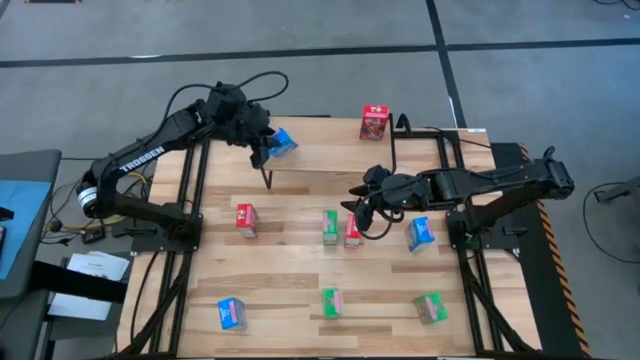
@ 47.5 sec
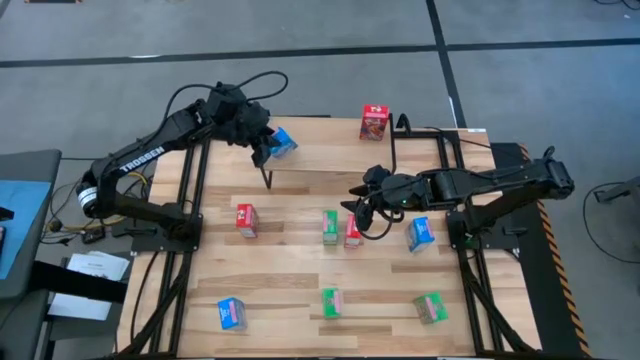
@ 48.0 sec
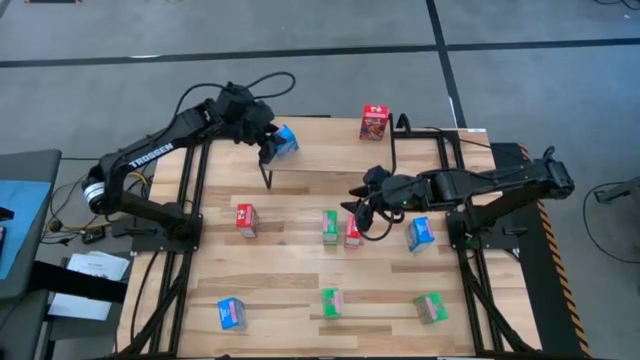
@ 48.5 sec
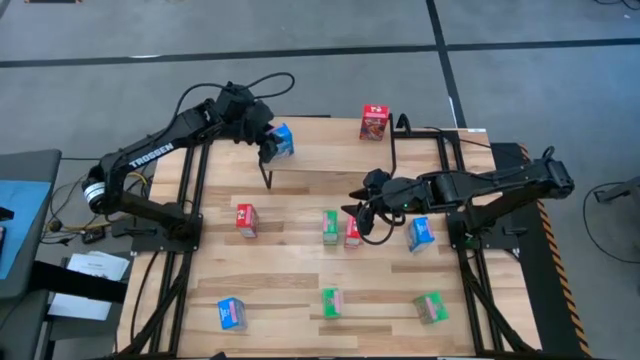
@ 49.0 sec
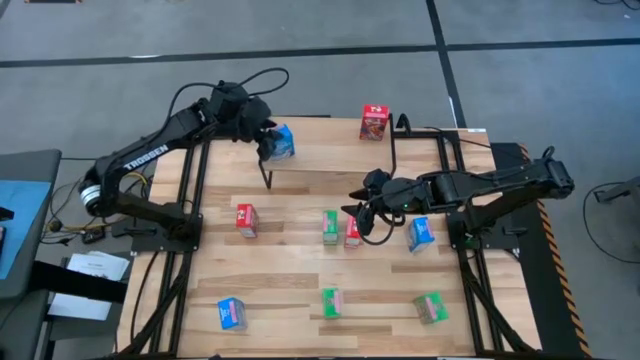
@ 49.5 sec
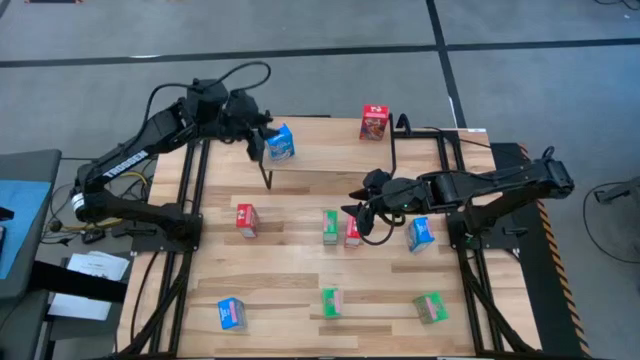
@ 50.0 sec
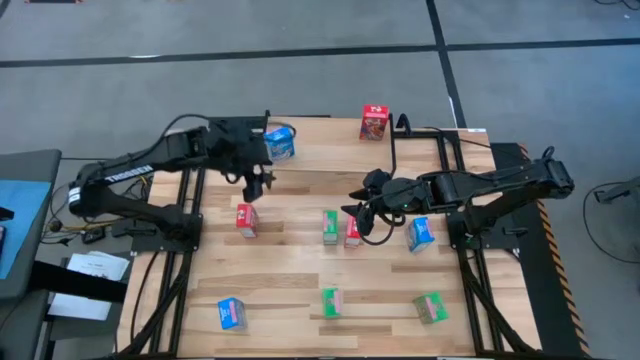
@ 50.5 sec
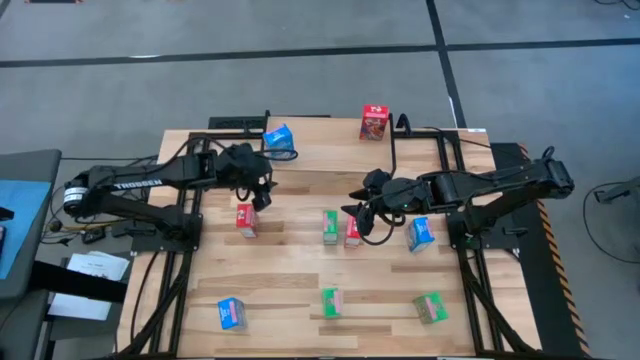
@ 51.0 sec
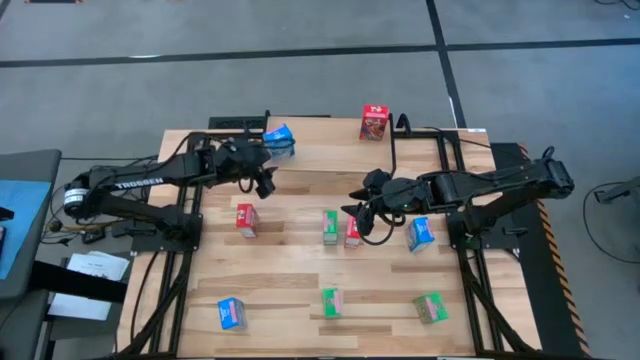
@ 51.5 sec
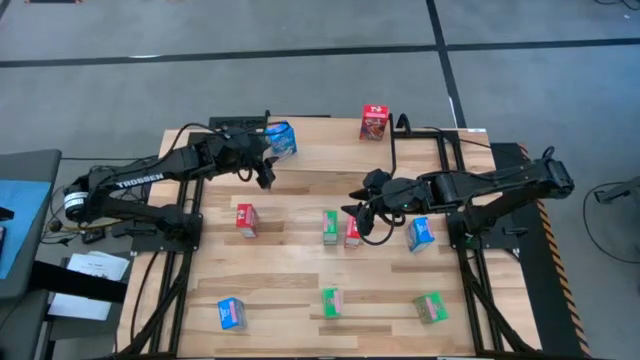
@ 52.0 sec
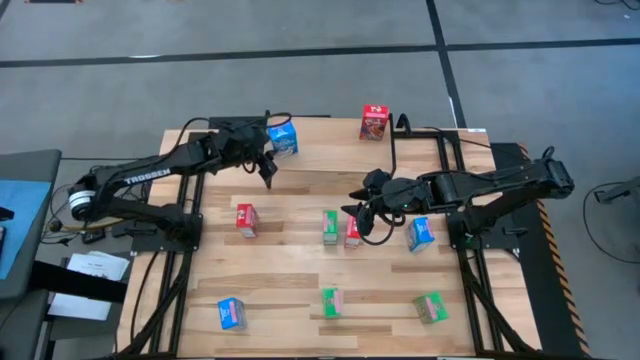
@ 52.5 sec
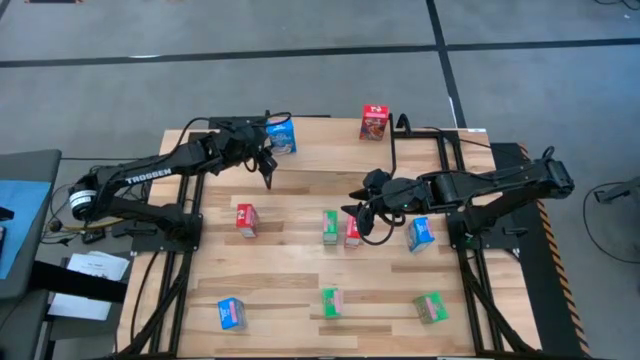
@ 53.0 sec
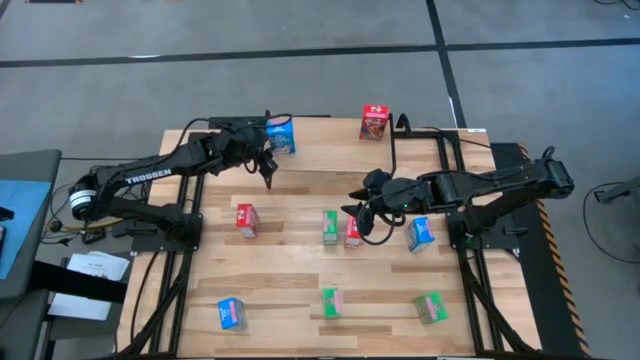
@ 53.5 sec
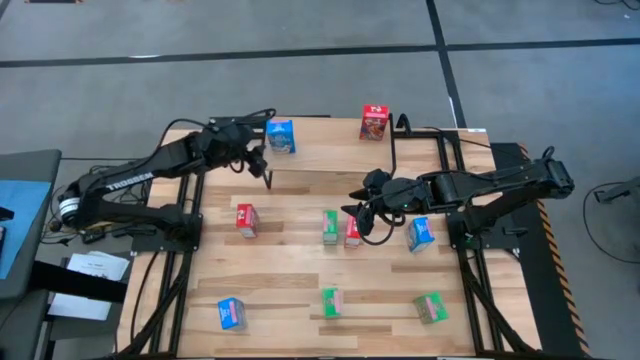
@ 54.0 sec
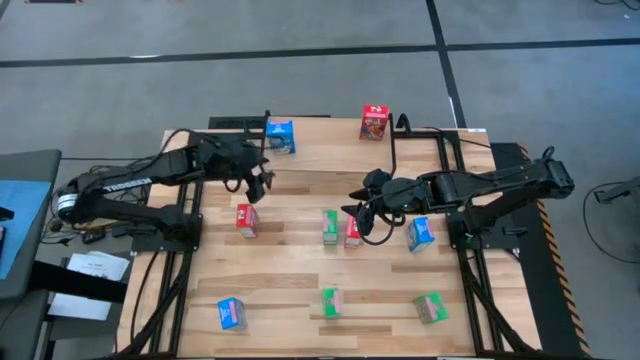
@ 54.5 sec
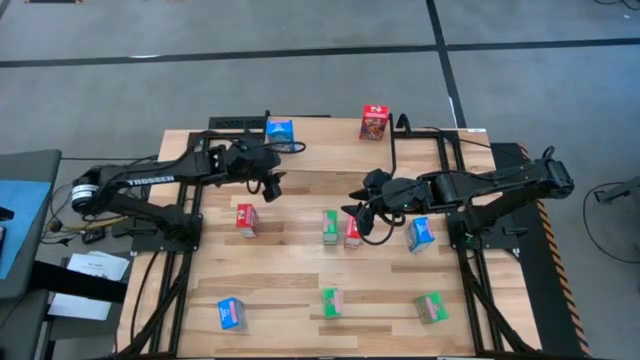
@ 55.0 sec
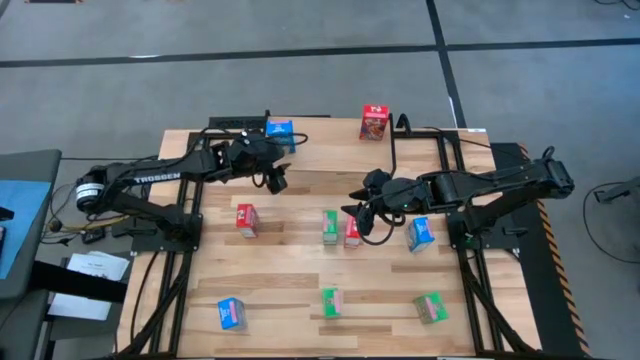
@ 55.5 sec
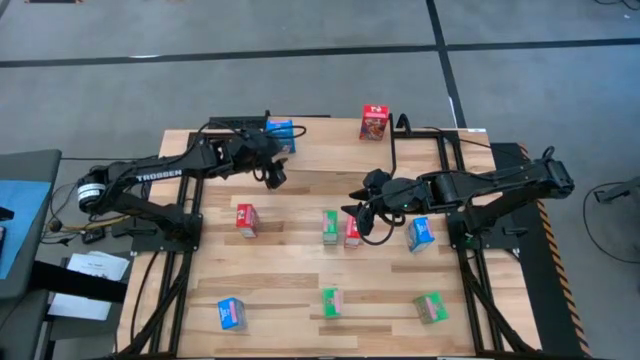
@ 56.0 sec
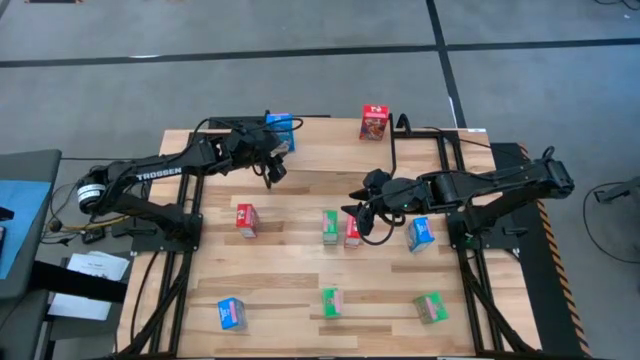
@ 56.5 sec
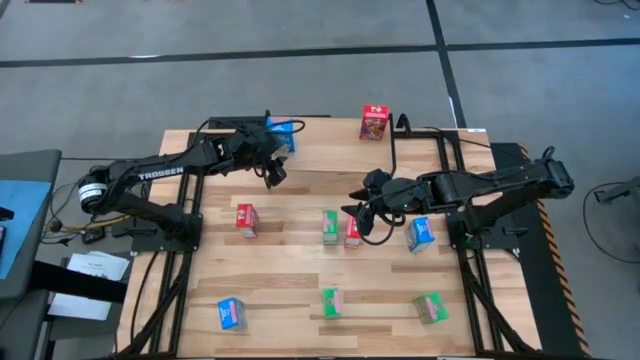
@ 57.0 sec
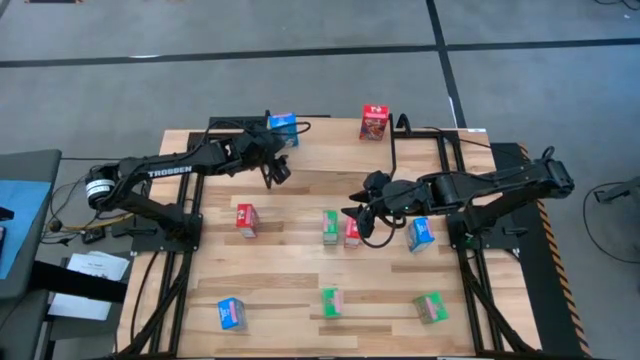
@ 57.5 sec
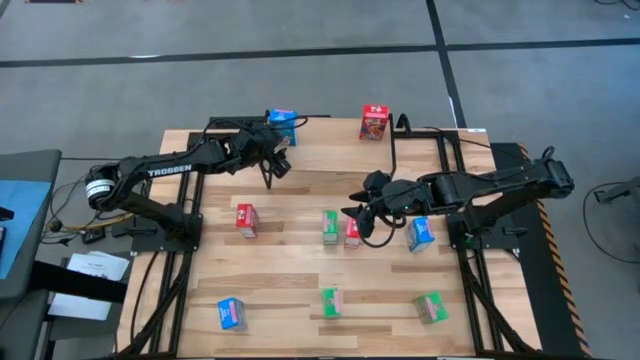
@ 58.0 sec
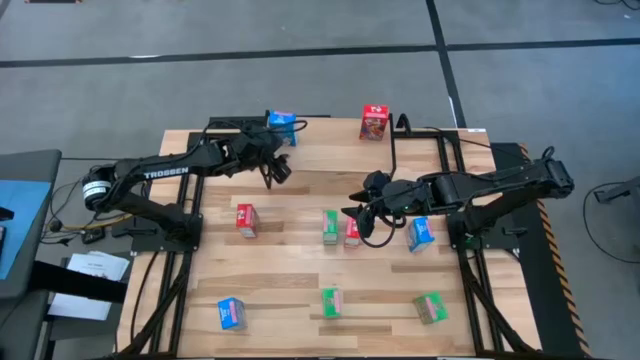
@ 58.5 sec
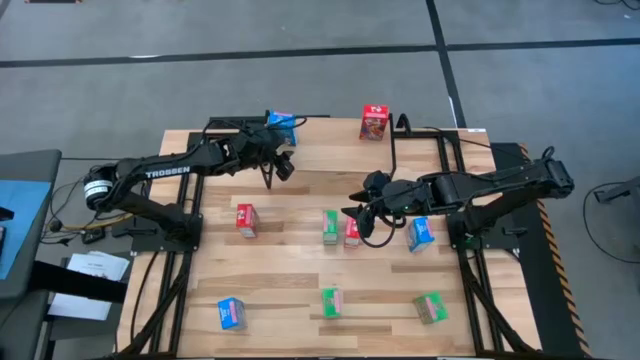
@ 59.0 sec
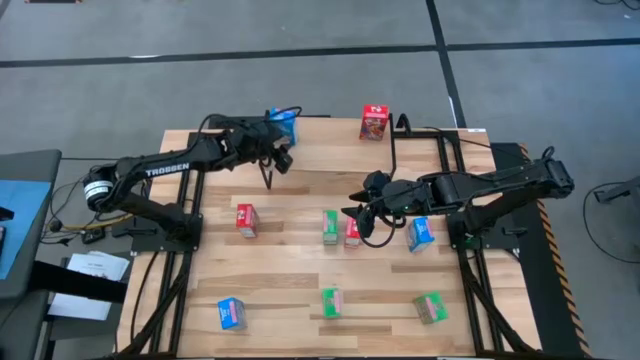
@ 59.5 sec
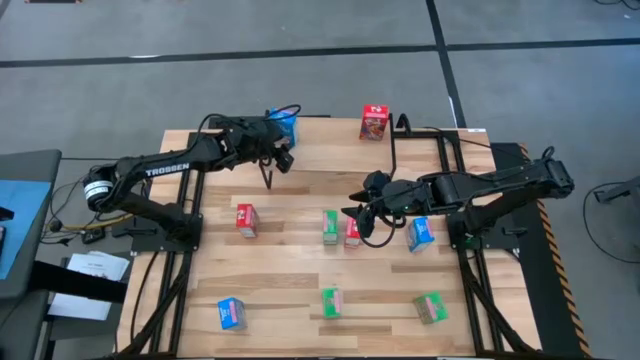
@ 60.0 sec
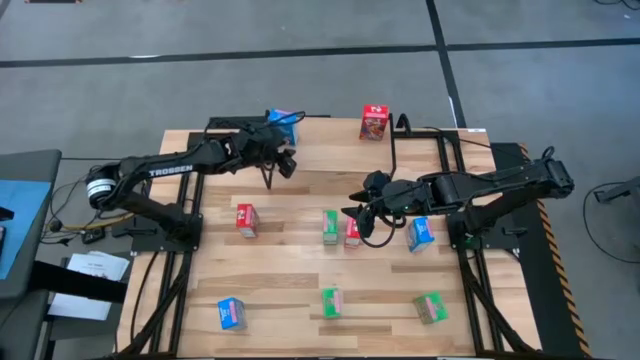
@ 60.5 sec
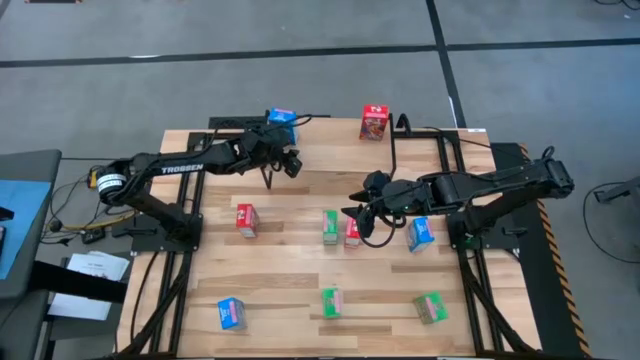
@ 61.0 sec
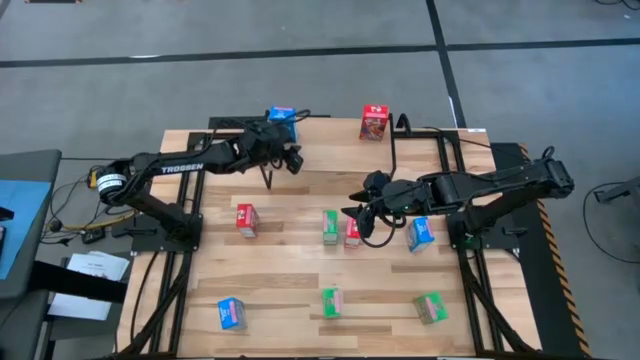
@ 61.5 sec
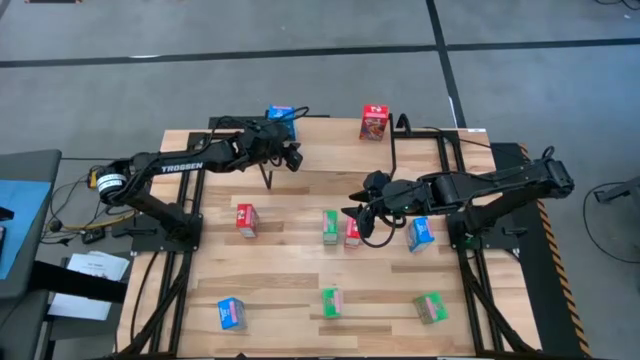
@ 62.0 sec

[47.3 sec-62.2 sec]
Task: Stack cereal on shelf
Put the top blue cereal box on the shelf

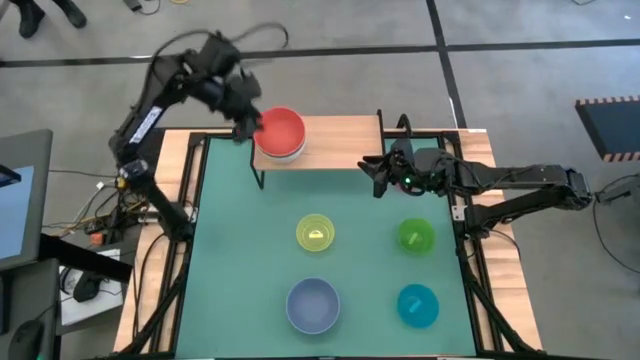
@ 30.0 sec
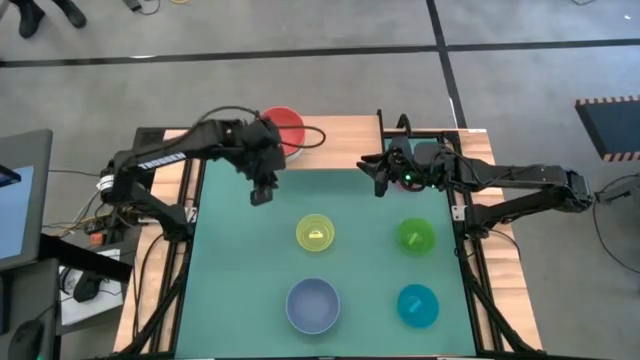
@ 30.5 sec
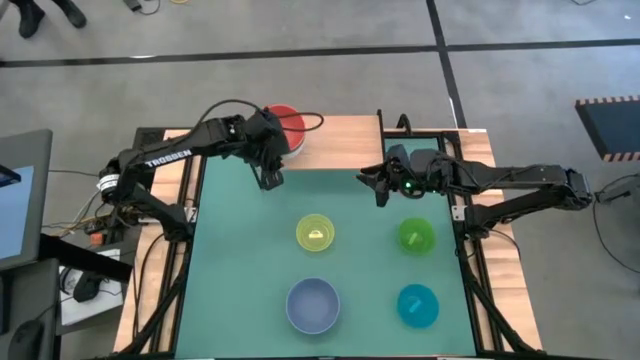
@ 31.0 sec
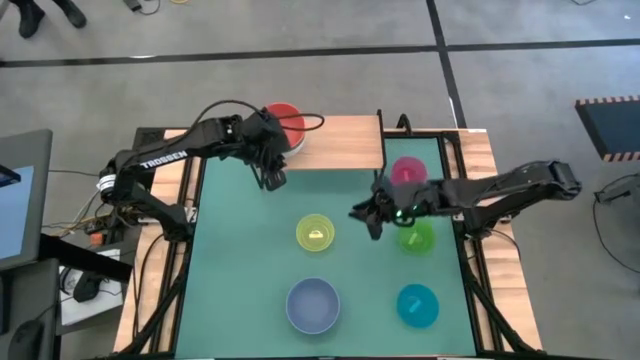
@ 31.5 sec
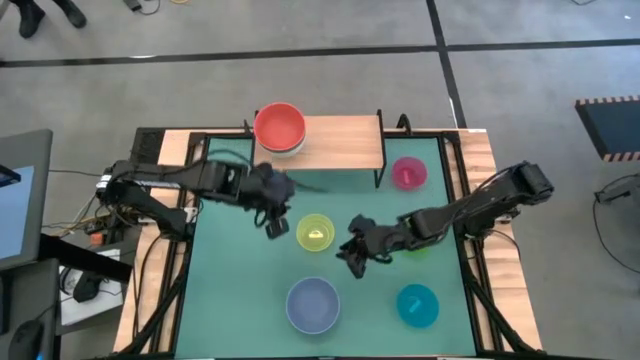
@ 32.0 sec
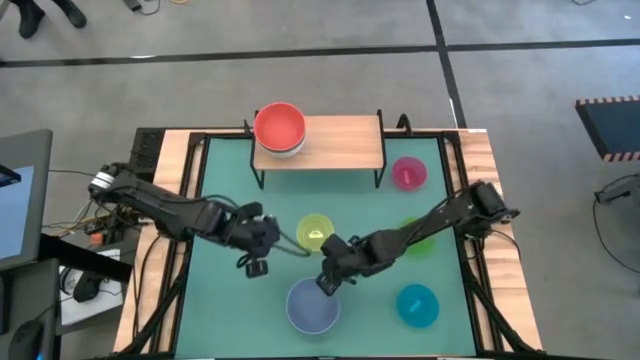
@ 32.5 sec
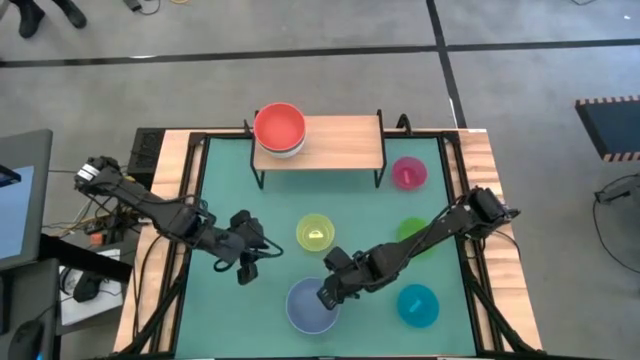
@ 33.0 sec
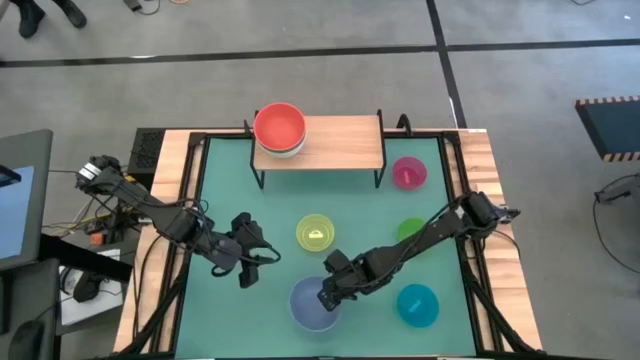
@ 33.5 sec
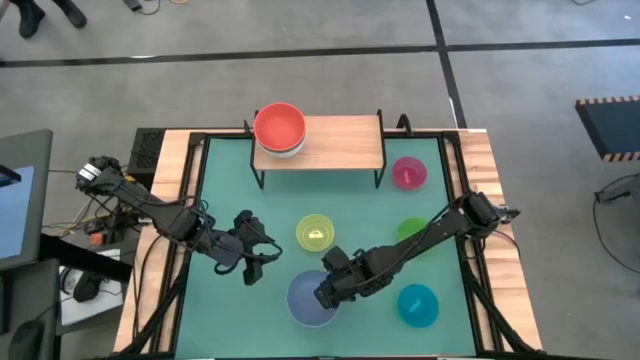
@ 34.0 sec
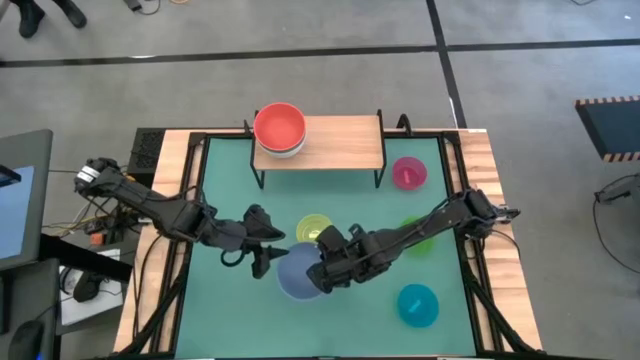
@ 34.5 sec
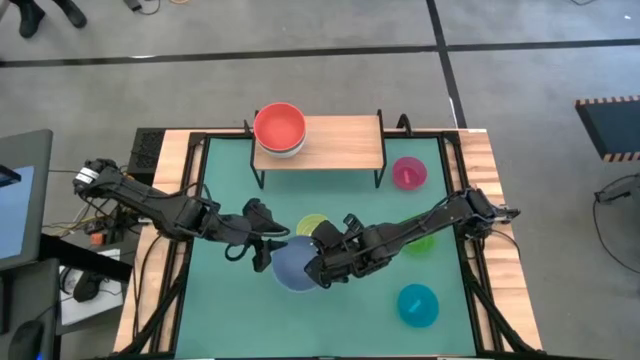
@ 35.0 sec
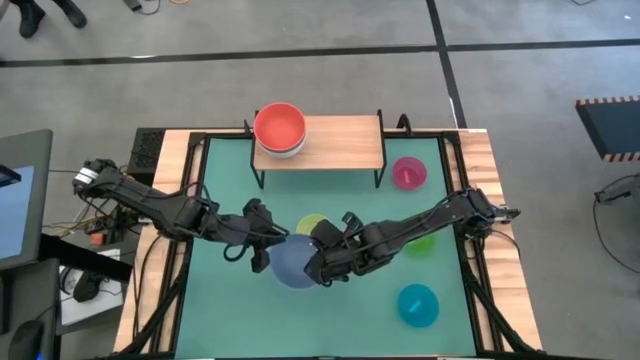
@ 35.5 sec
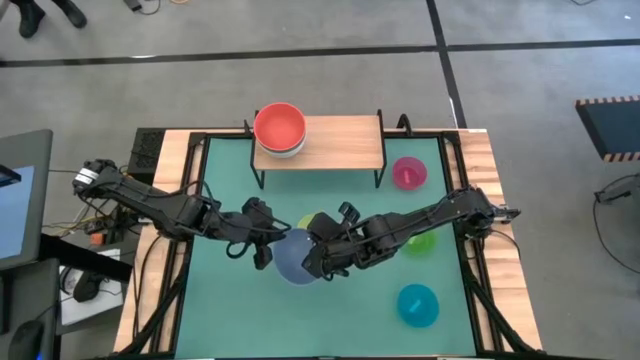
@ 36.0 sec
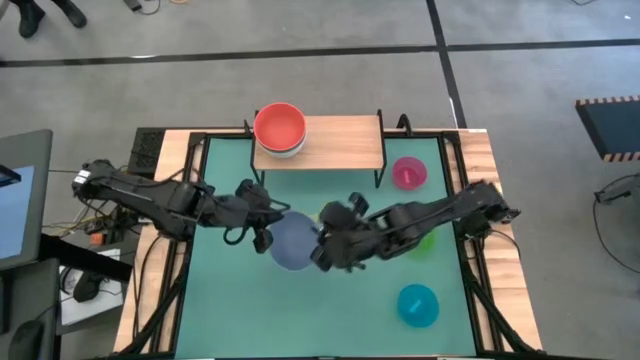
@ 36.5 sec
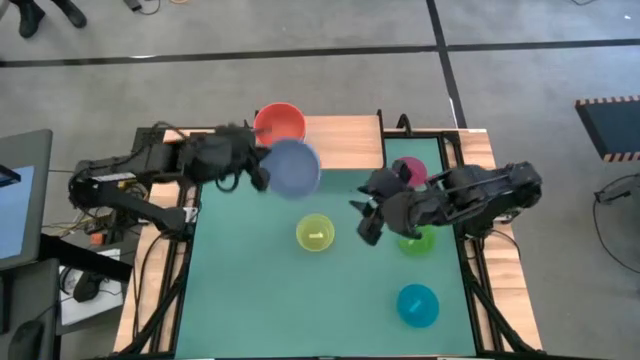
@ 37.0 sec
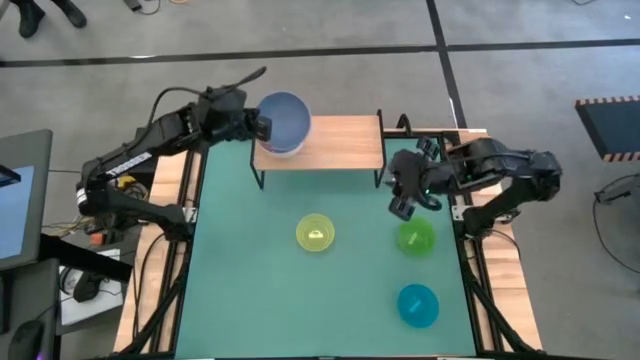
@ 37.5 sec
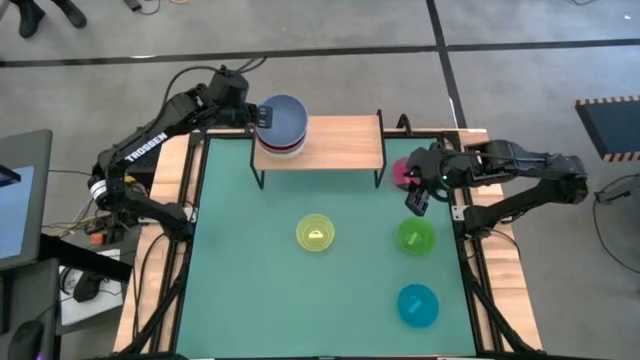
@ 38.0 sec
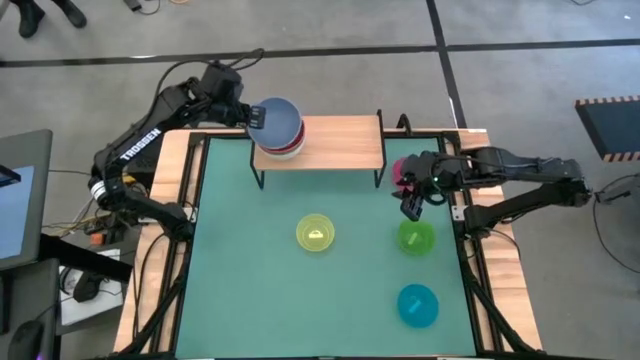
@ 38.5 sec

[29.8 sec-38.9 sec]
Task: Place and stack bowls onto a shelf
Stack the large purple bowl on the large white bowl on the shelf
